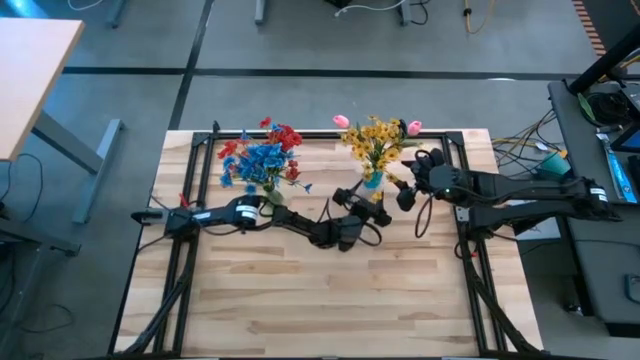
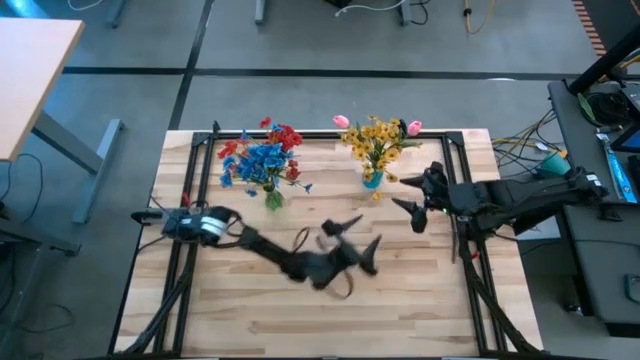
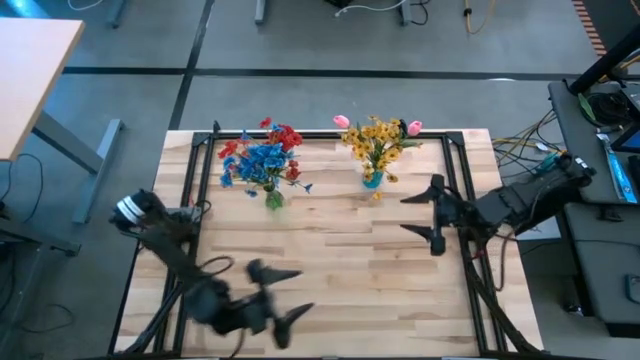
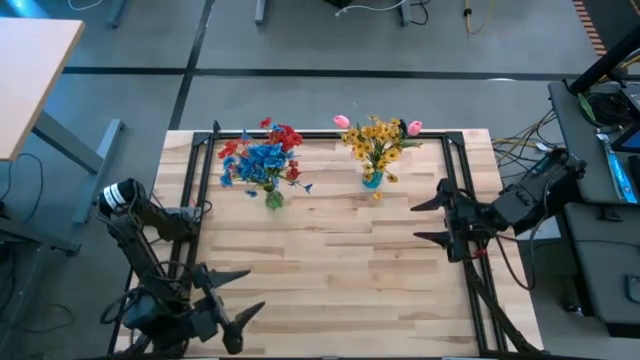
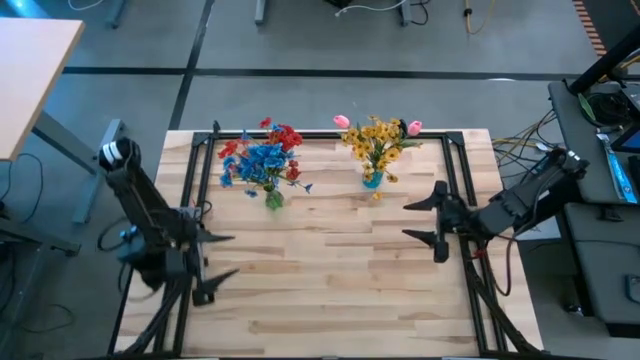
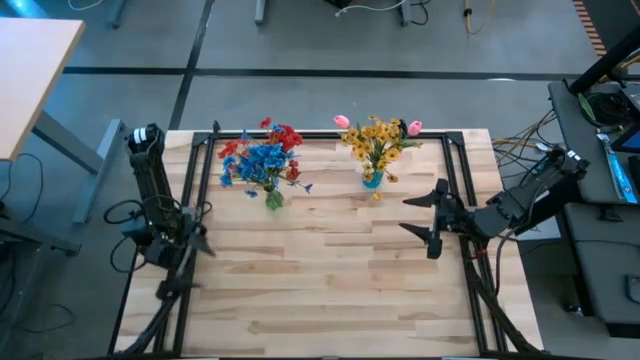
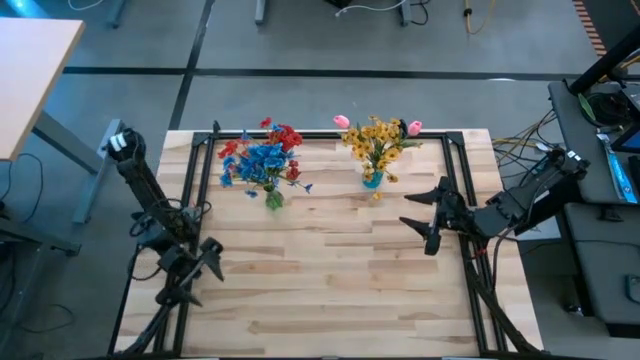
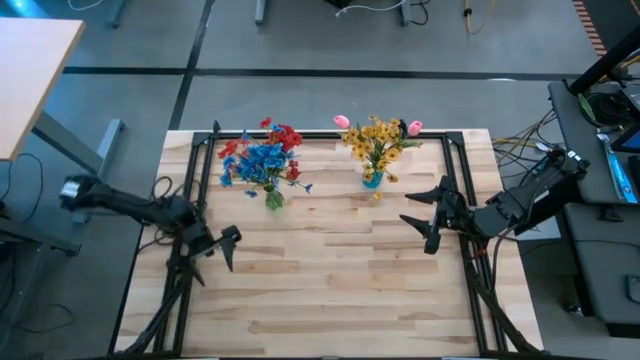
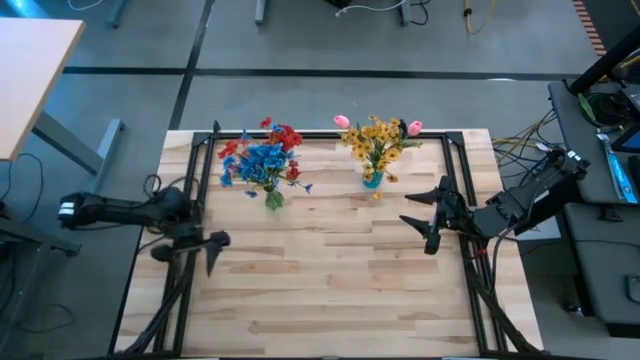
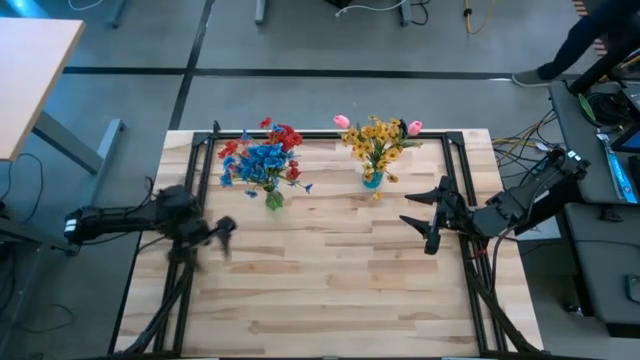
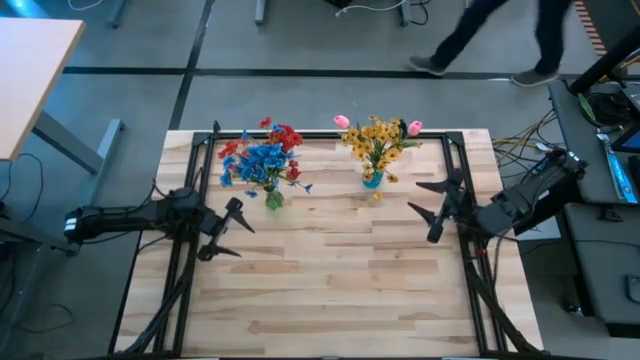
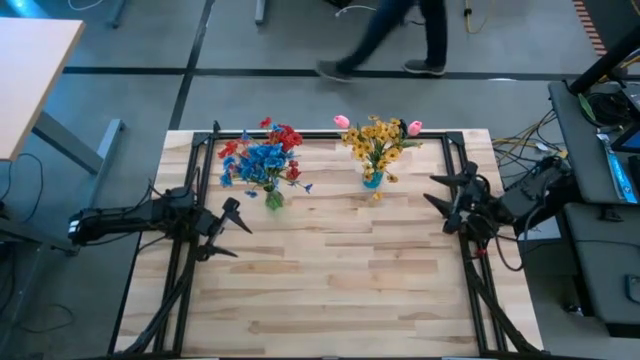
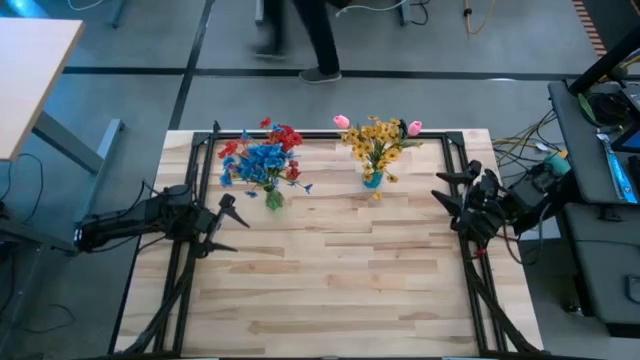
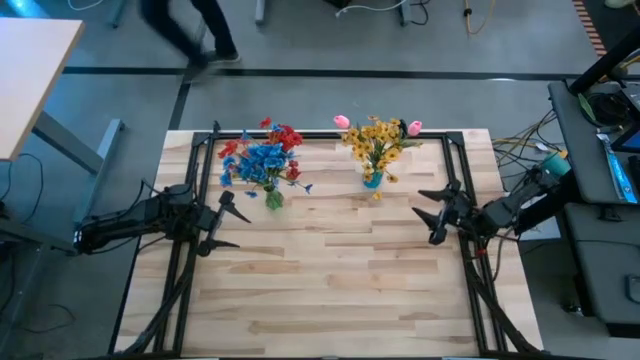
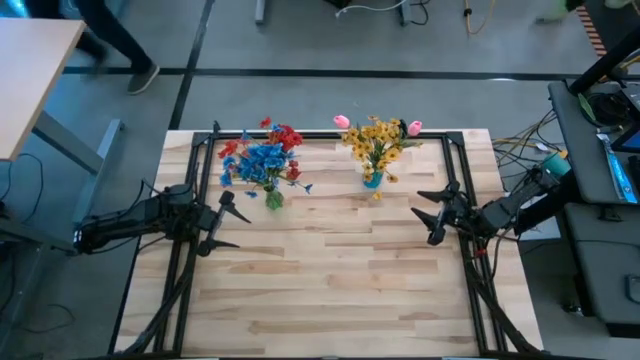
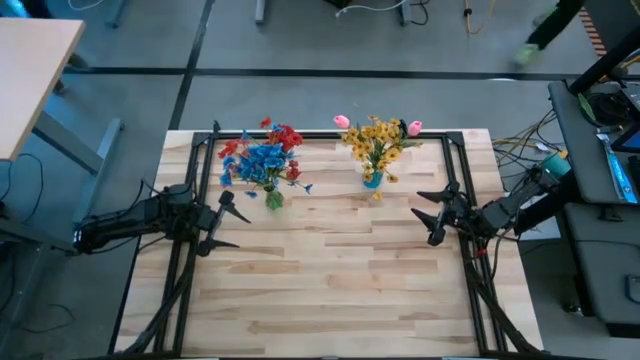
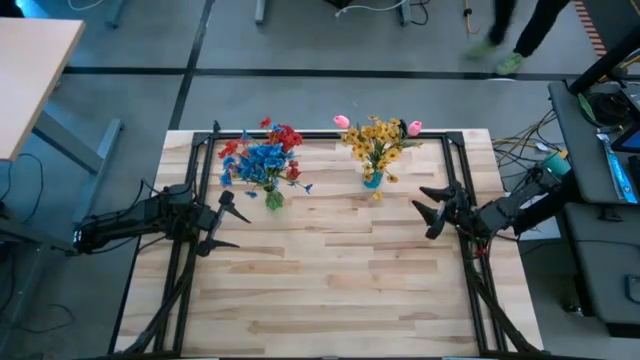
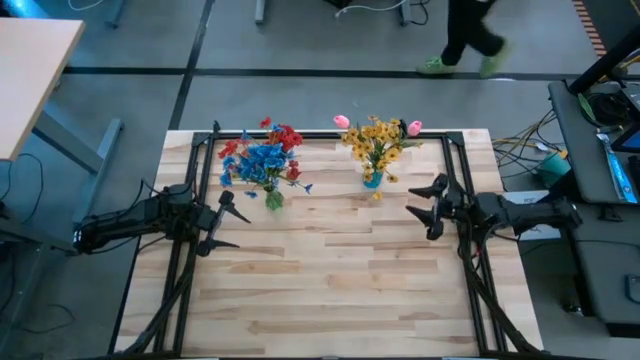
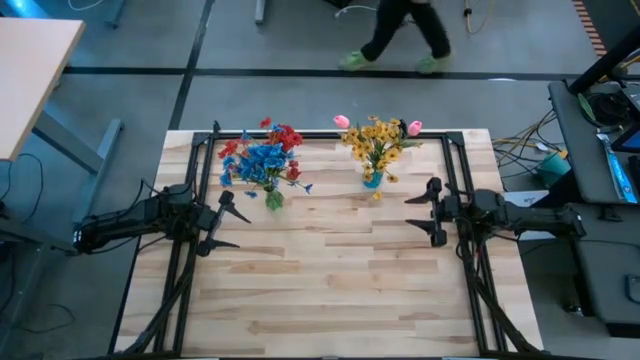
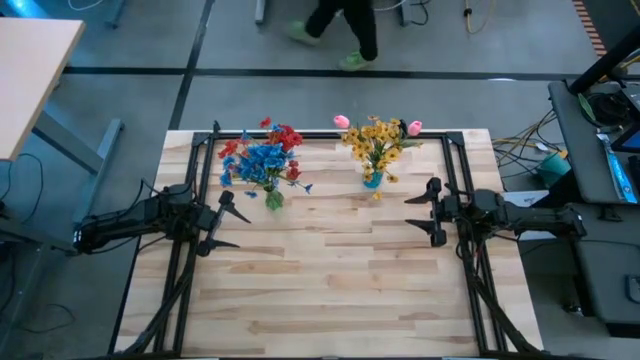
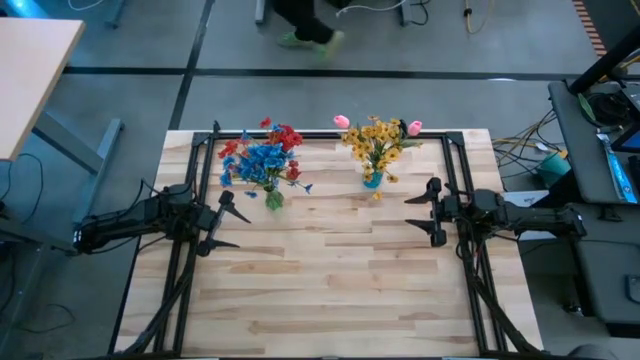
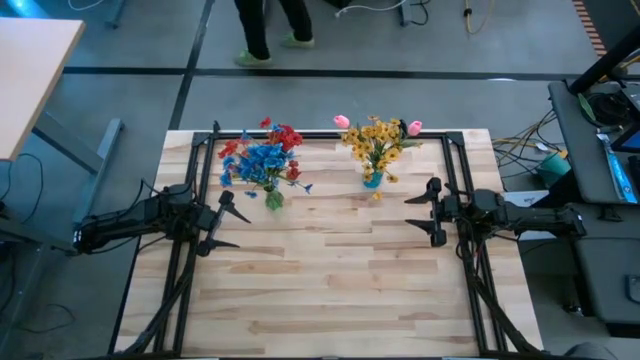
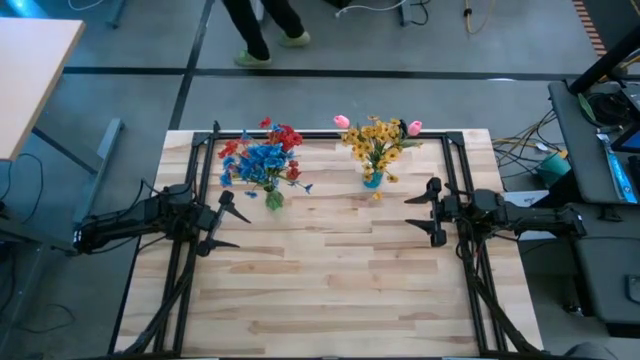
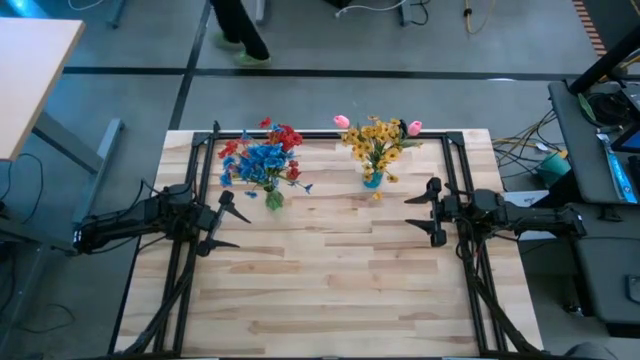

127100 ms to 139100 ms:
Task: Sort flowers into vase by color
Return to Home Position

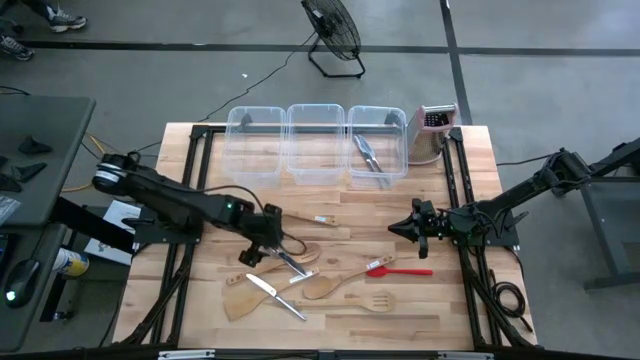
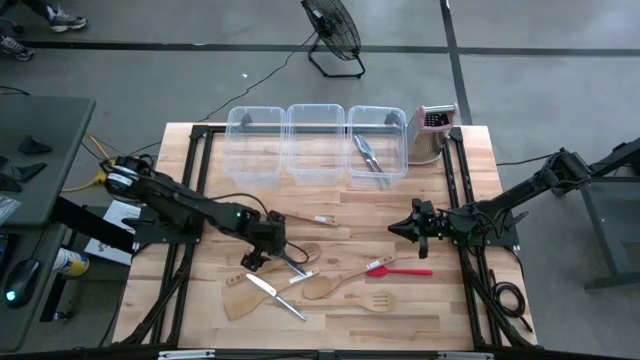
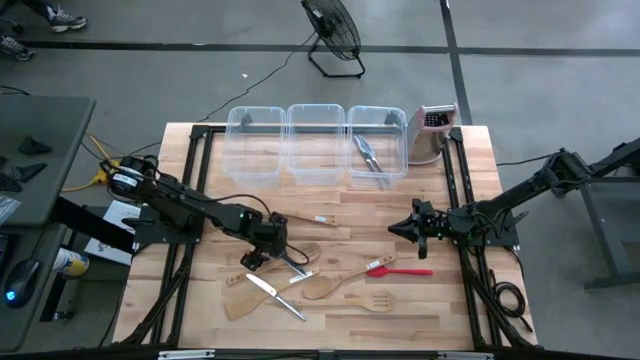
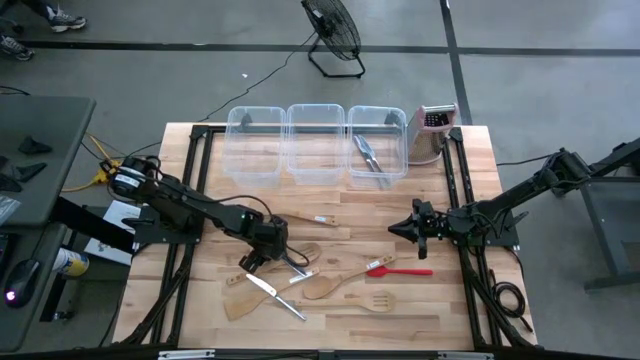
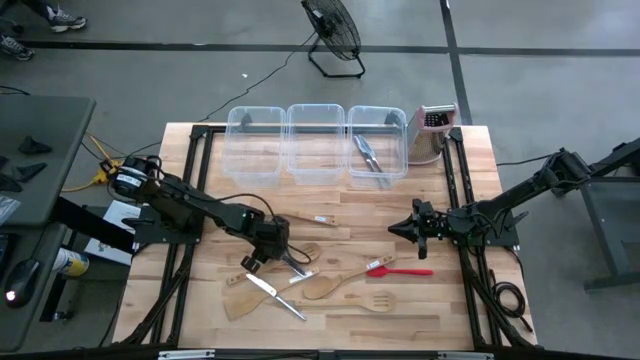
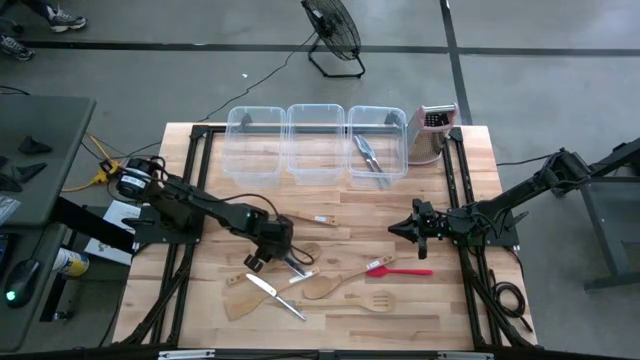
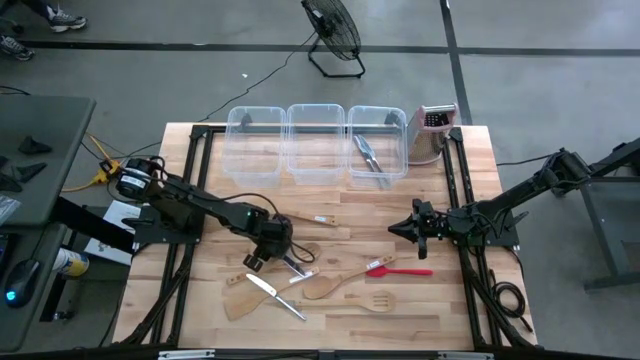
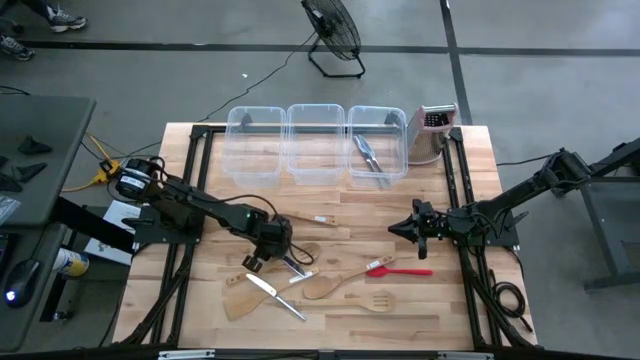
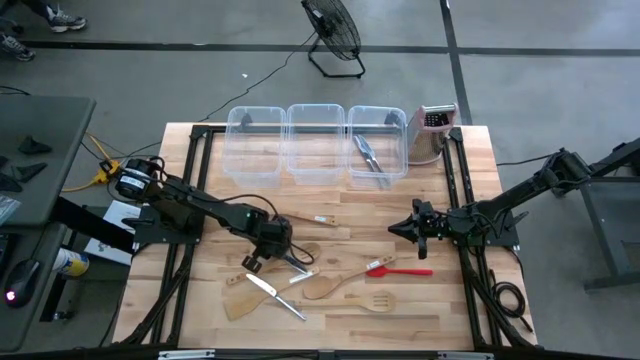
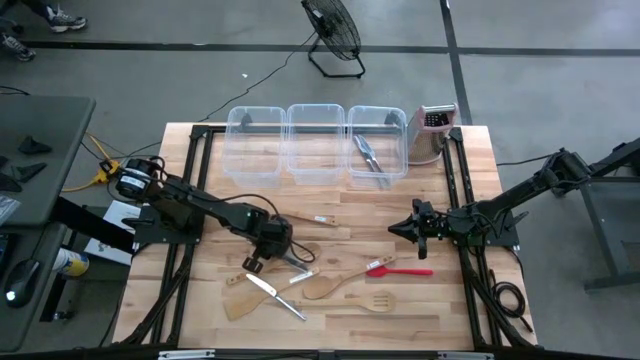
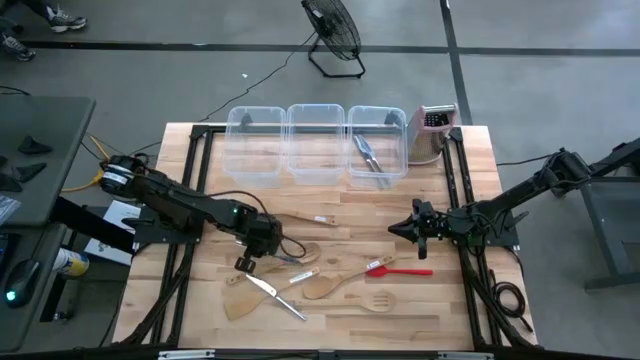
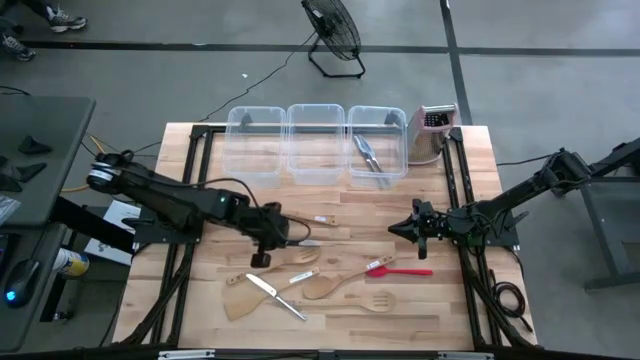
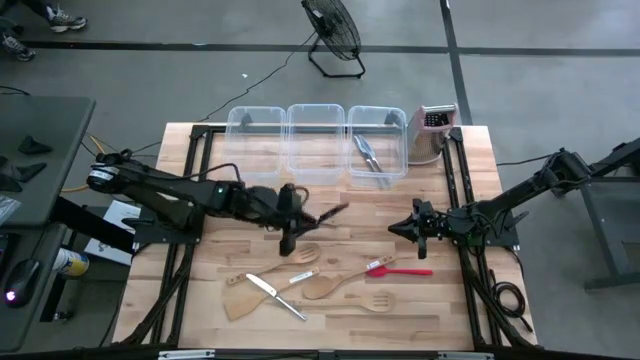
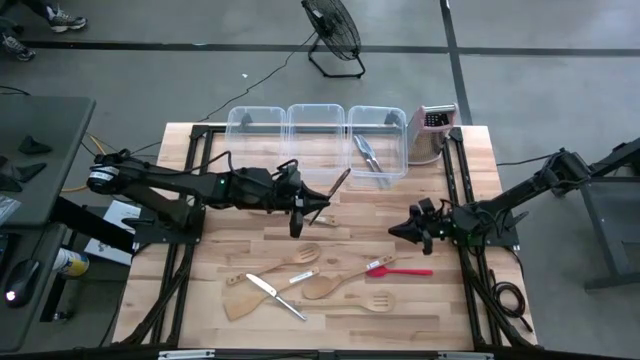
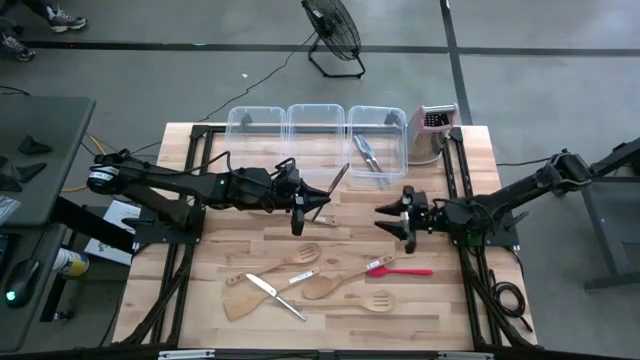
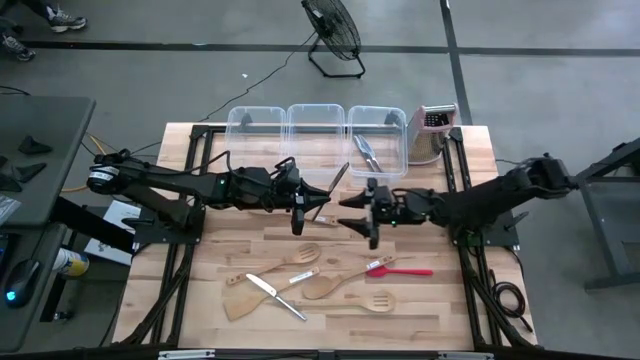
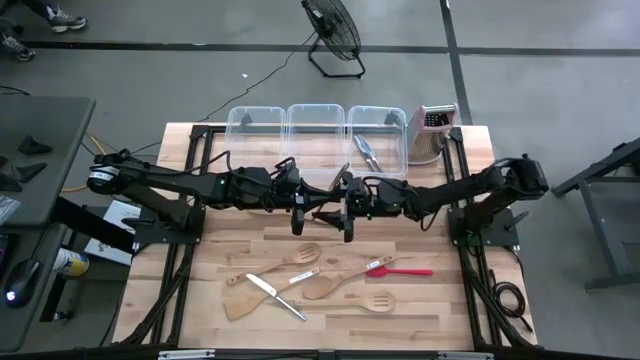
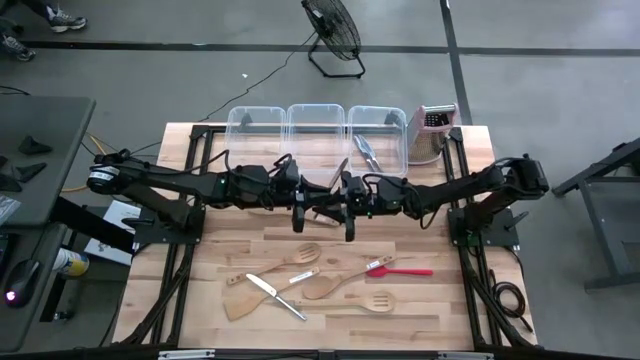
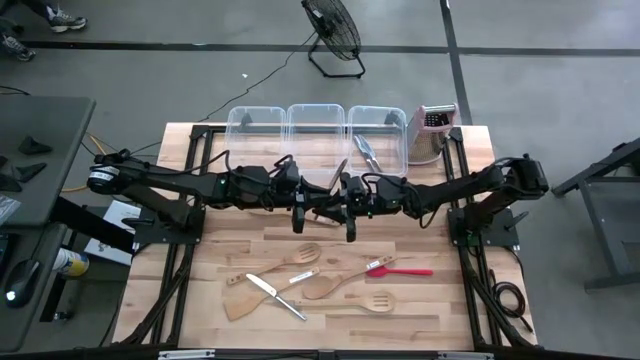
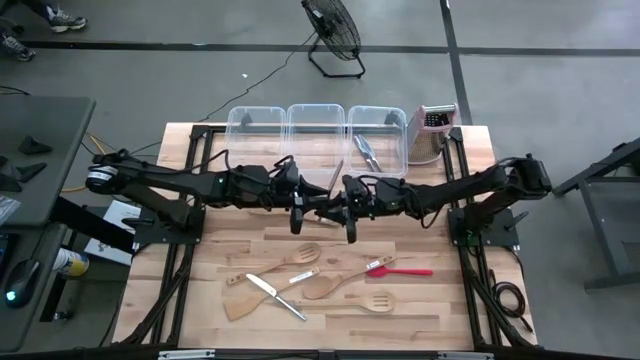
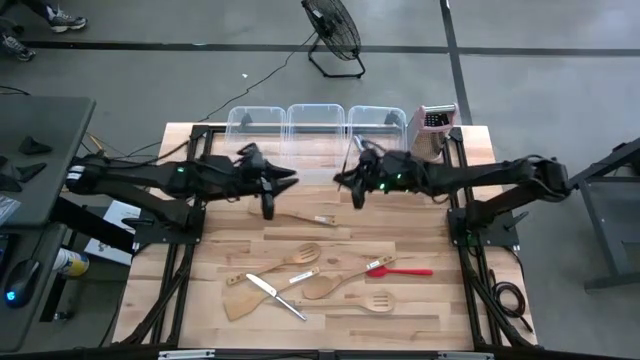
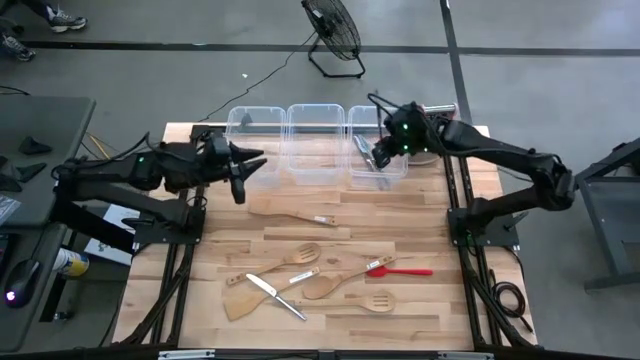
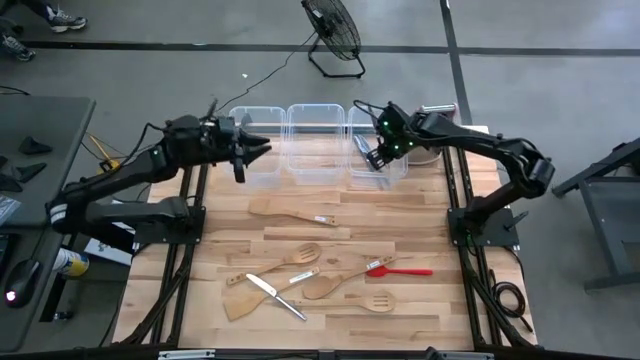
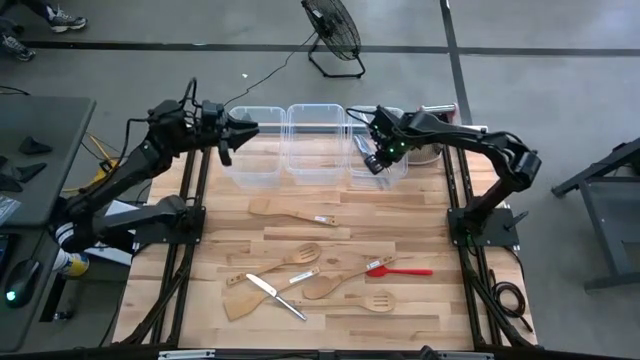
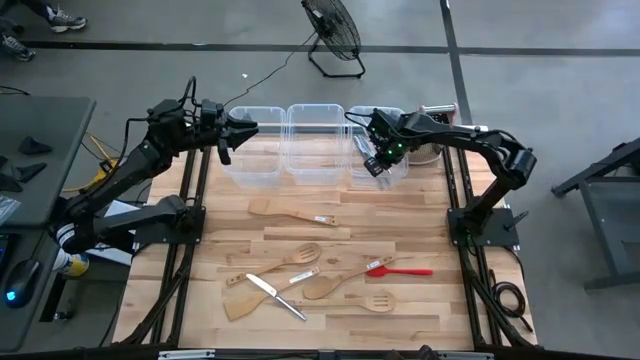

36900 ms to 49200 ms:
Task: Pick & Place Kitchen Items
Put the table knife into the right transparent bin
